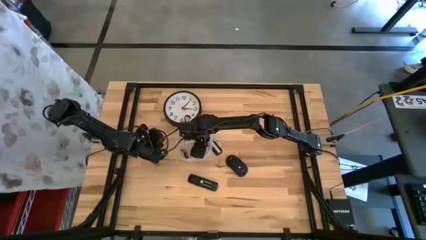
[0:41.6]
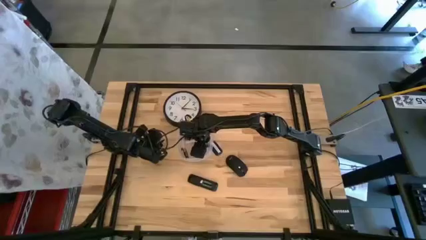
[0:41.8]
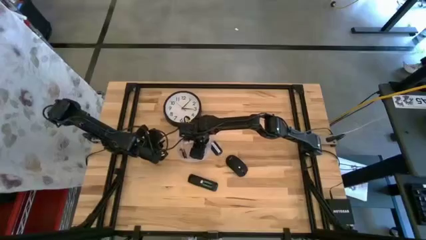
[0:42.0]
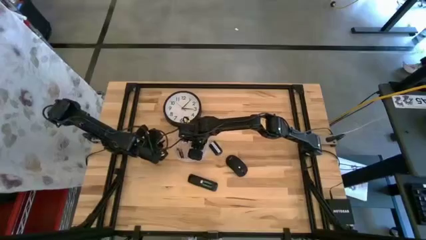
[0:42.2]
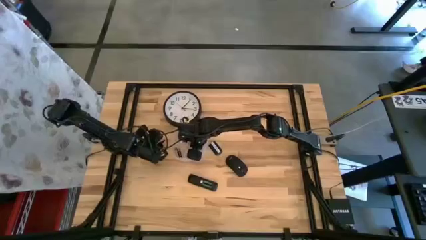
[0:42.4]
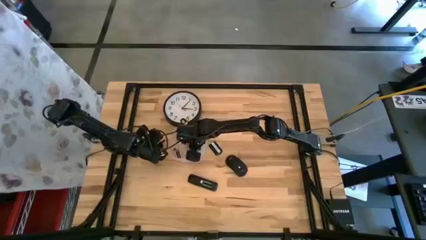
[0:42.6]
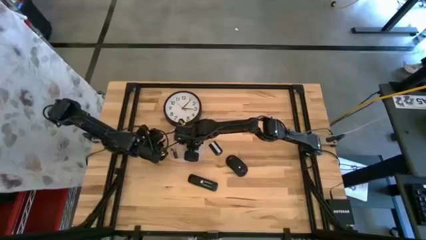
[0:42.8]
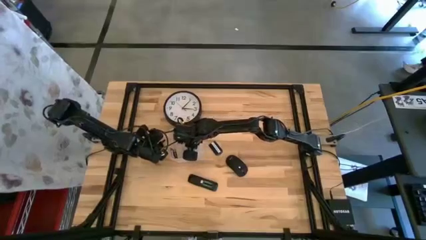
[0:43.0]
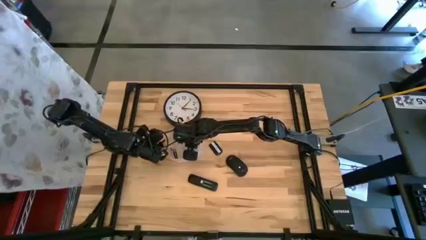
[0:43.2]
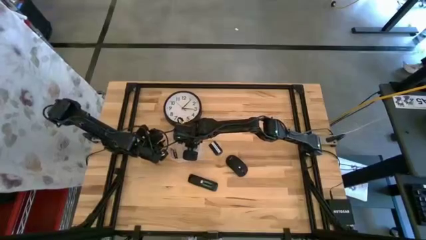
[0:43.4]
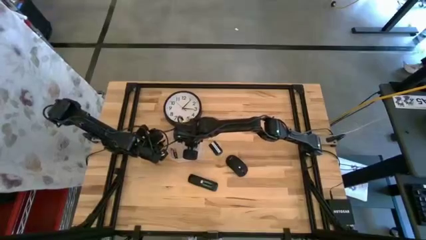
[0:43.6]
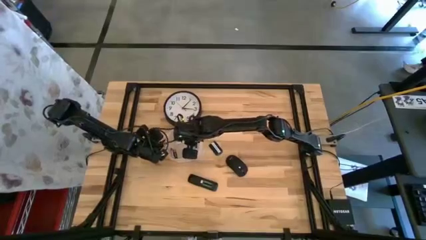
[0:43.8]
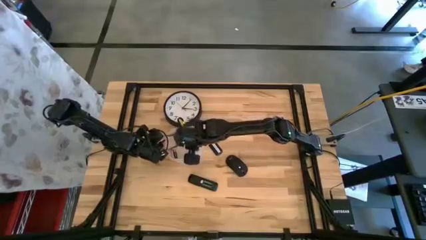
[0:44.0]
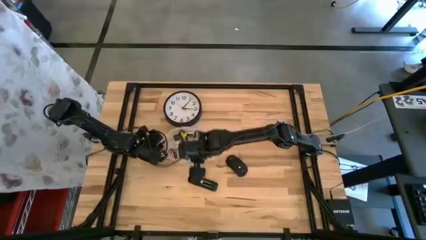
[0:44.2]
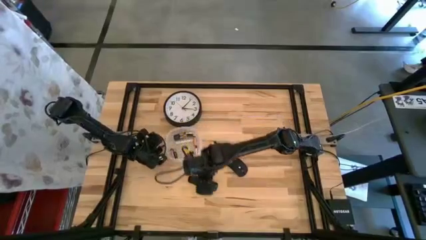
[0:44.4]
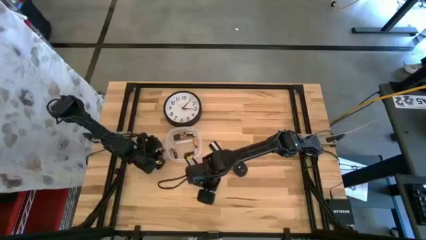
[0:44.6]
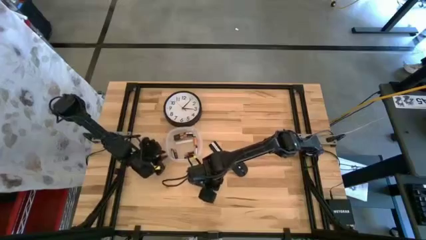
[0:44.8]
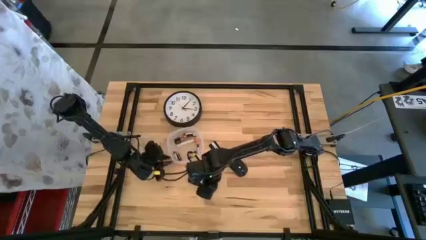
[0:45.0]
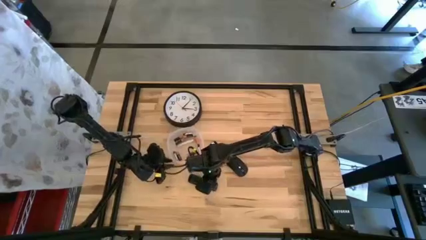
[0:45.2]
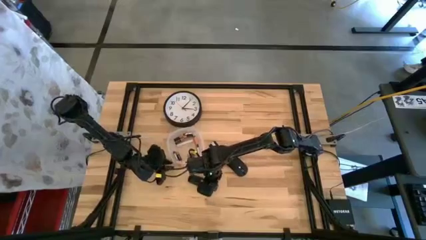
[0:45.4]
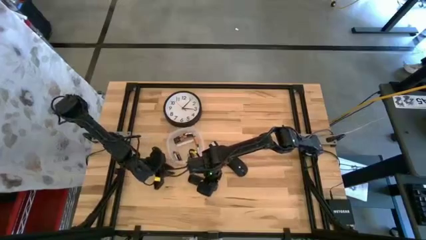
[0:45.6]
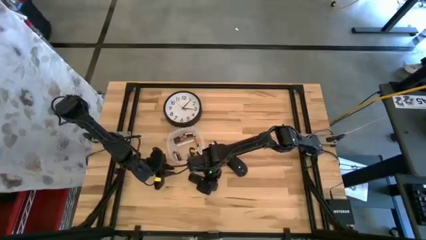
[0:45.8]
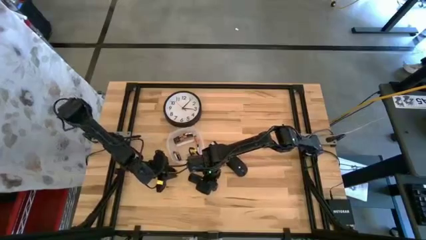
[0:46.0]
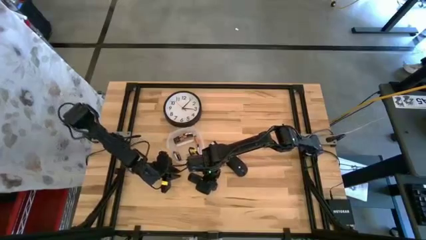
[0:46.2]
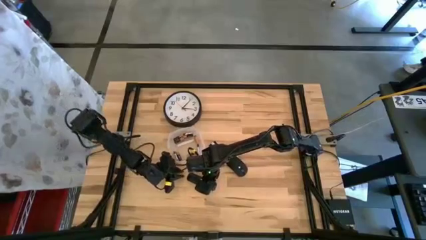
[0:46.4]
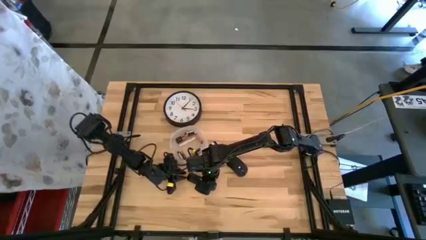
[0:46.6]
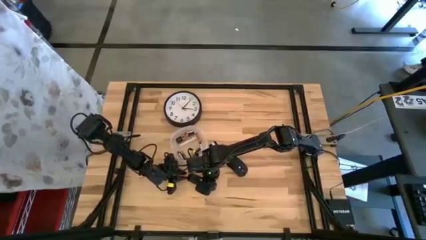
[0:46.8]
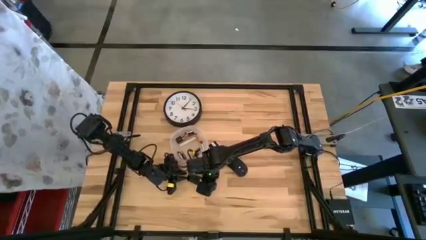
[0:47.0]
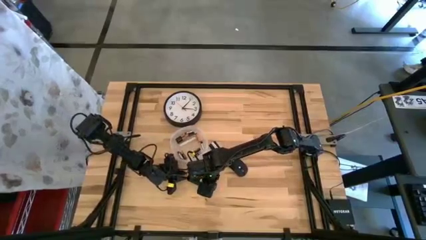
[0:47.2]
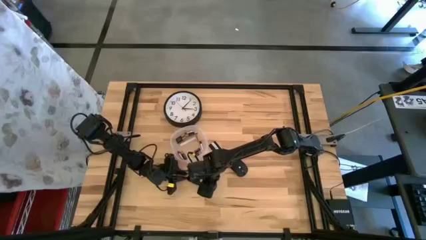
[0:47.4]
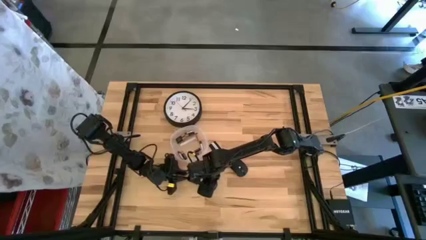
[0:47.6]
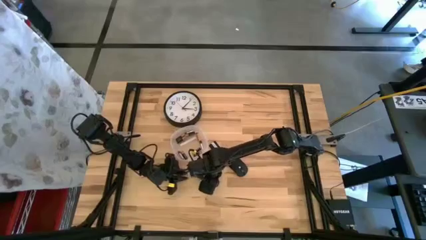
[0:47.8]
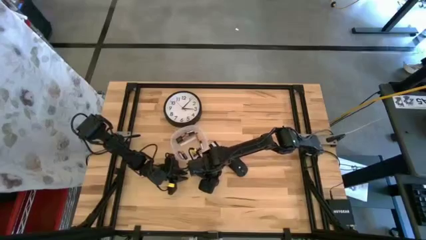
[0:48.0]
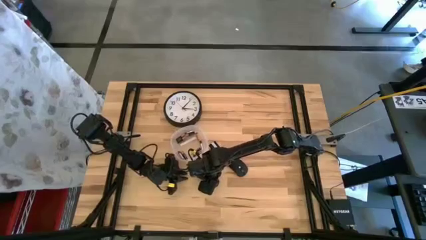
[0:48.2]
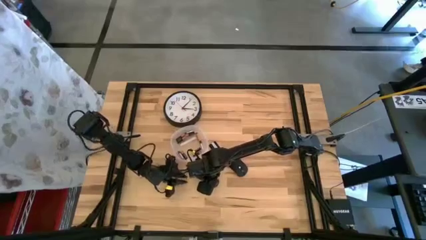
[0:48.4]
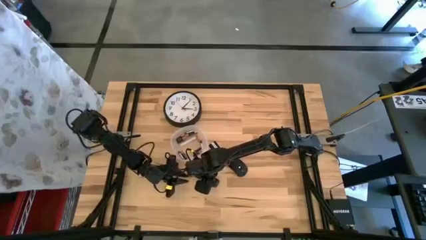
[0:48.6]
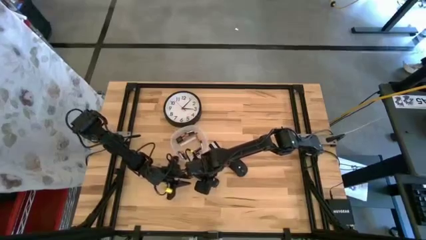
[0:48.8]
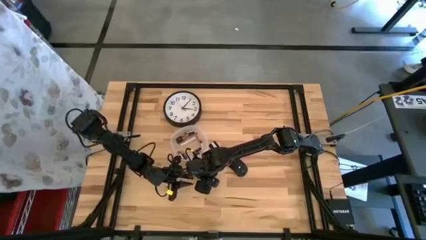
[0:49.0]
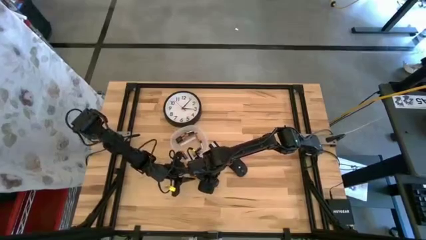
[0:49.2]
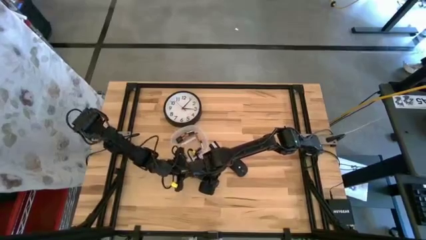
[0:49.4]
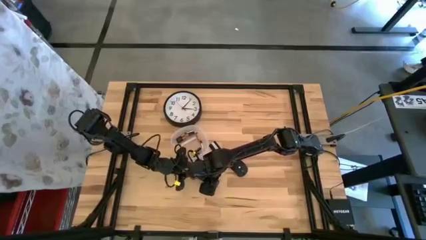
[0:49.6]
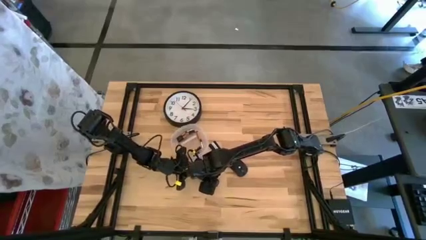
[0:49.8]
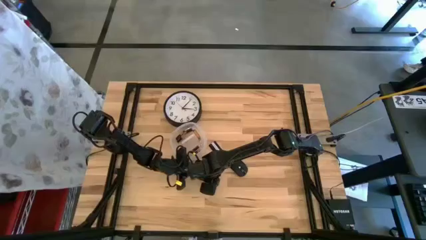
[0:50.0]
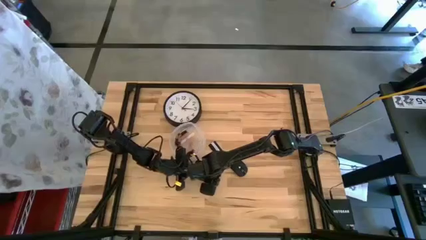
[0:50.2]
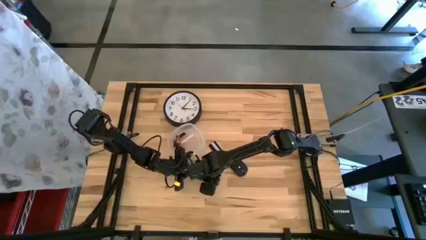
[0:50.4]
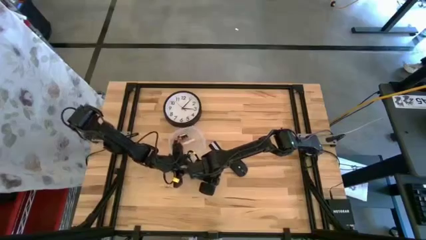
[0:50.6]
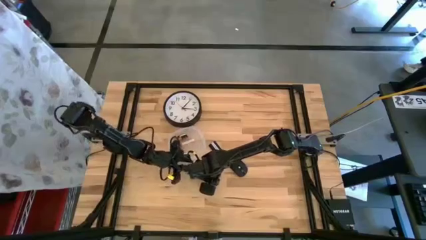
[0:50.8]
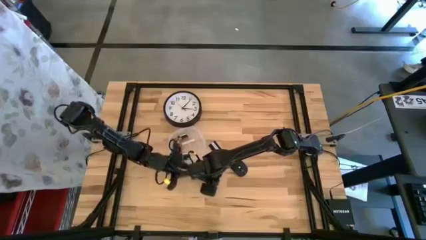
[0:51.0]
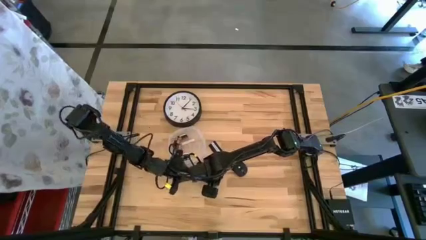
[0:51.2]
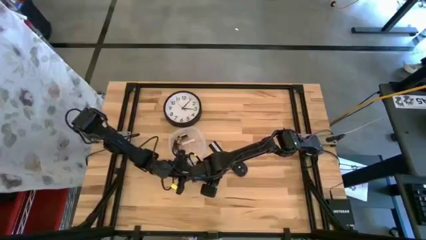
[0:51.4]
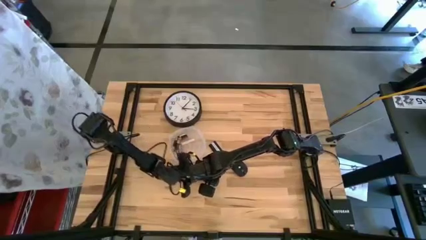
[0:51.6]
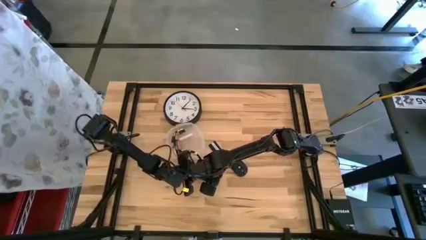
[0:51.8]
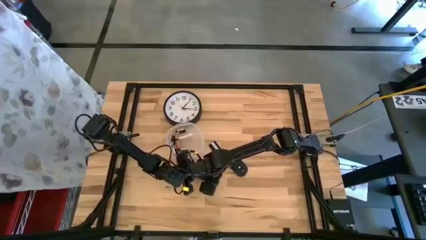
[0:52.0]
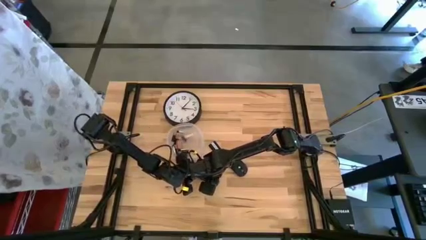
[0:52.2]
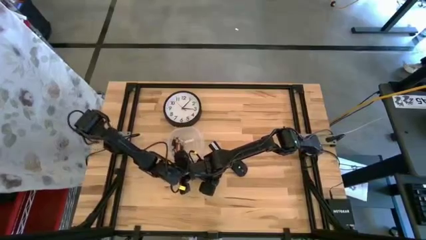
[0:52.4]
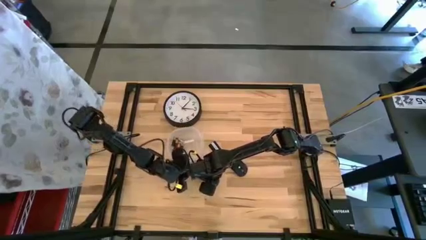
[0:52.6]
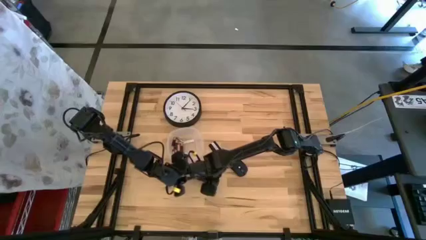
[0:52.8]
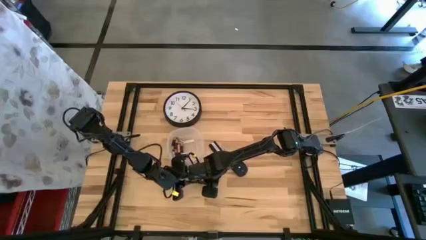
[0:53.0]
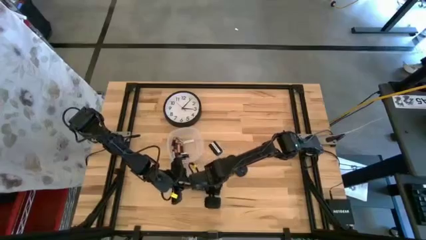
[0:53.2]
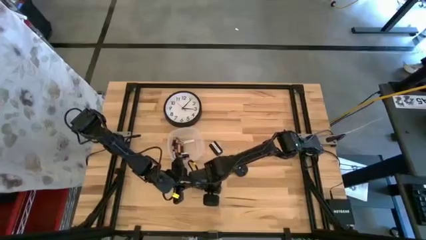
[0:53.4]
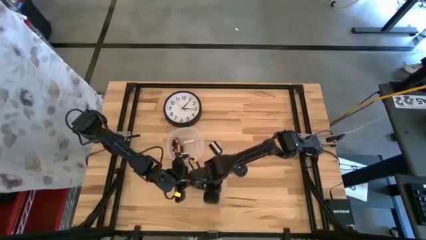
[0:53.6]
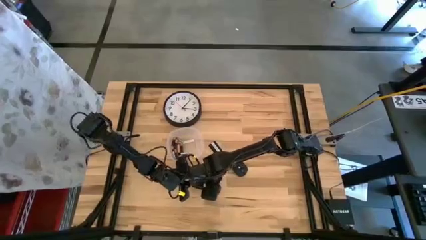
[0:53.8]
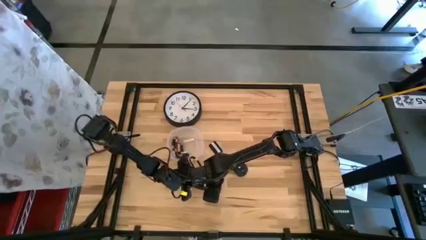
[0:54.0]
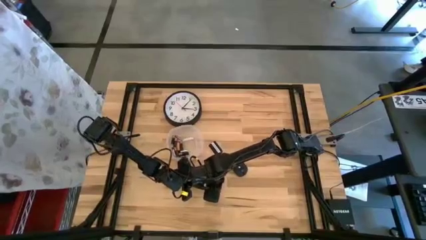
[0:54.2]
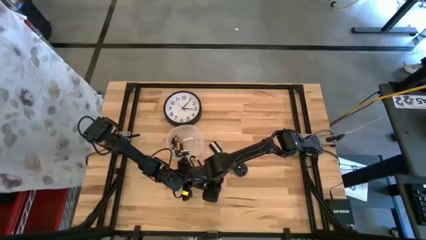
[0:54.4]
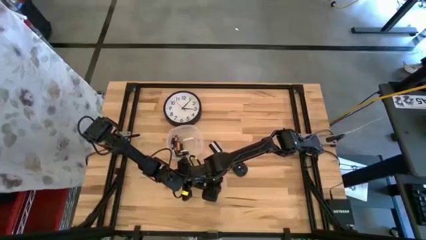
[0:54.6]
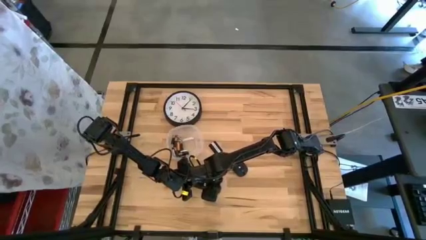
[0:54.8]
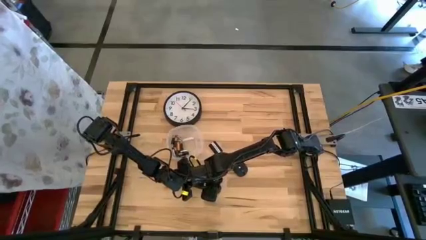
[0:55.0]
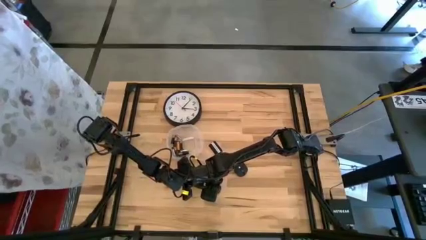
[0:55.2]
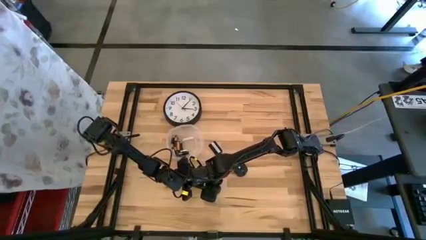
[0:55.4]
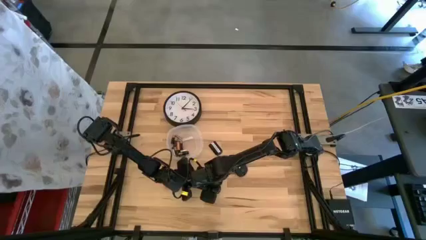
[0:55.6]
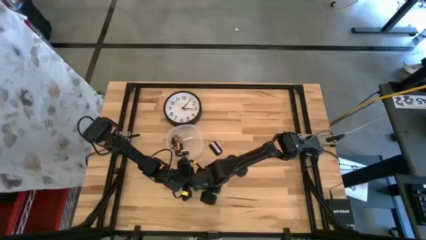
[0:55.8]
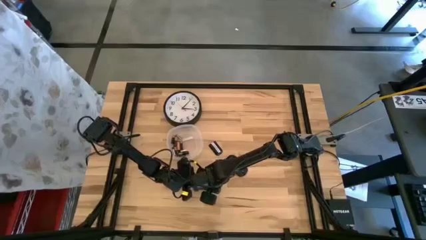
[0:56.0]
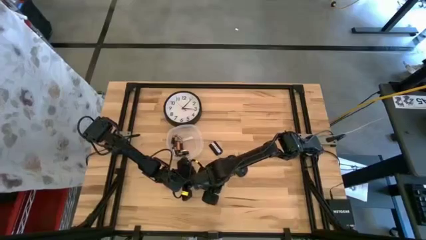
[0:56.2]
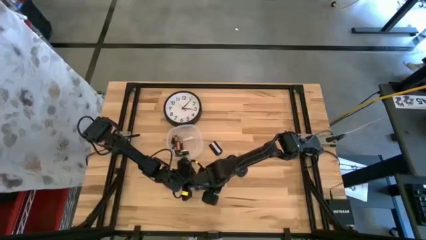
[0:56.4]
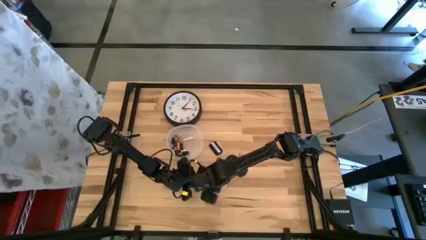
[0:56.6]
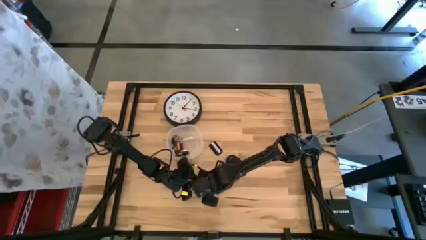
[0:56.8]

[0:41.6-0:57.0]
Task: Insert battery
Insert the silver battery into the remote control
